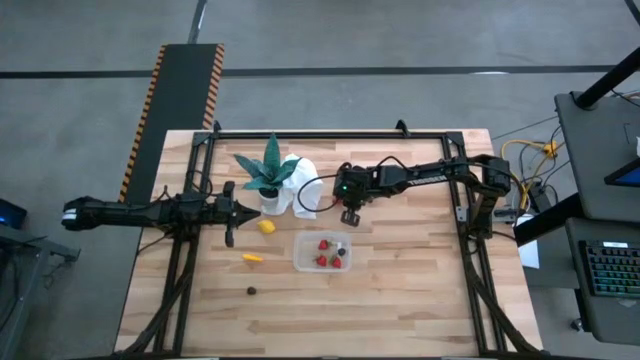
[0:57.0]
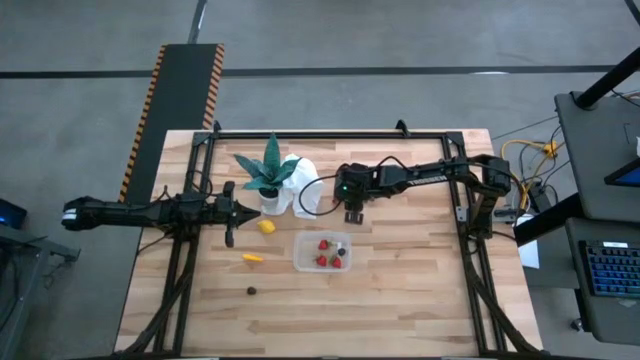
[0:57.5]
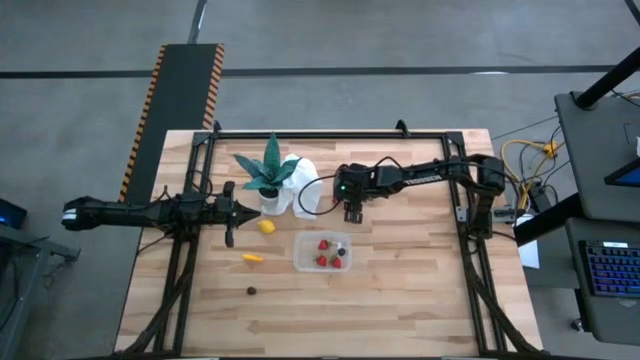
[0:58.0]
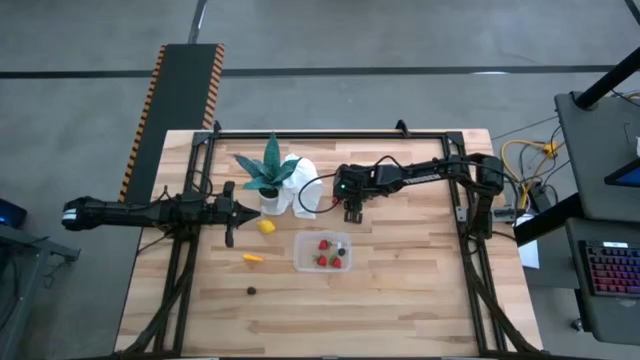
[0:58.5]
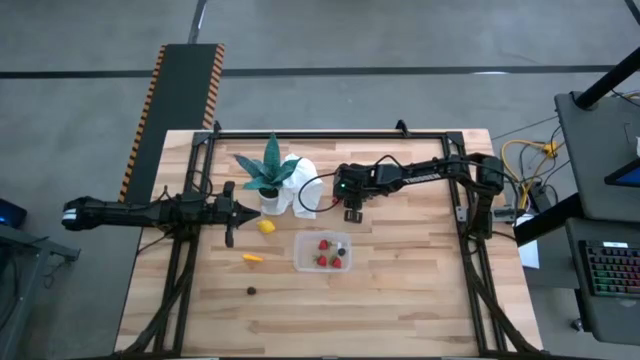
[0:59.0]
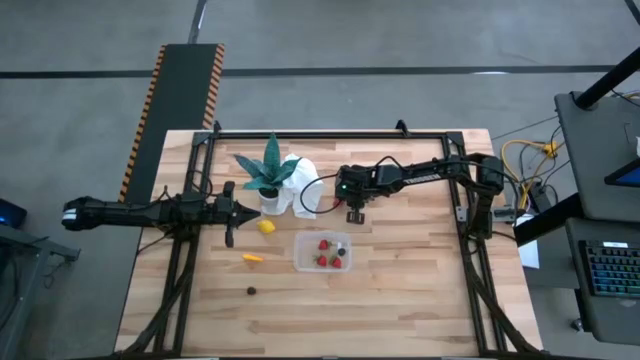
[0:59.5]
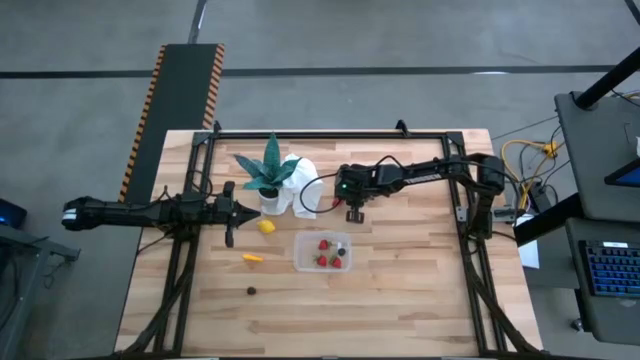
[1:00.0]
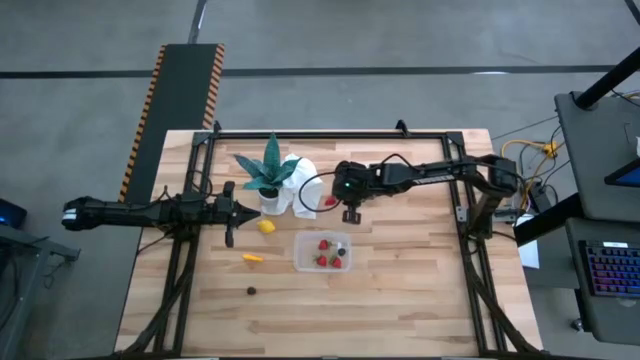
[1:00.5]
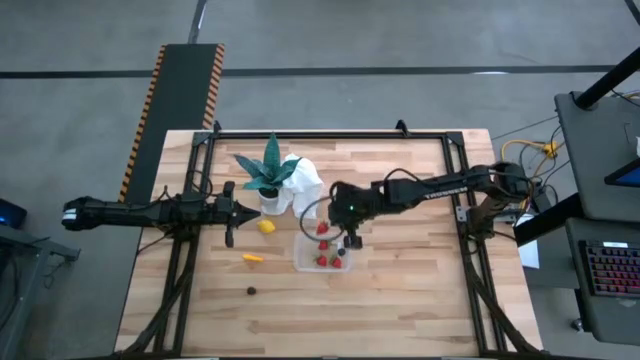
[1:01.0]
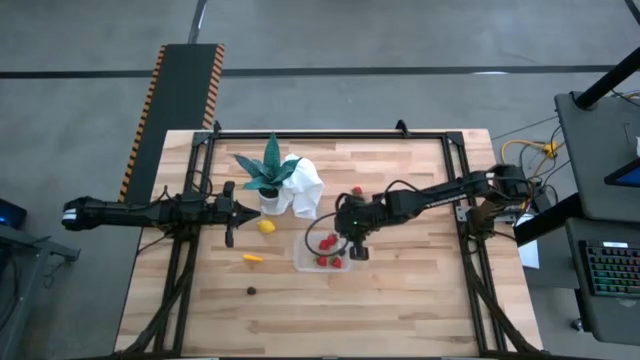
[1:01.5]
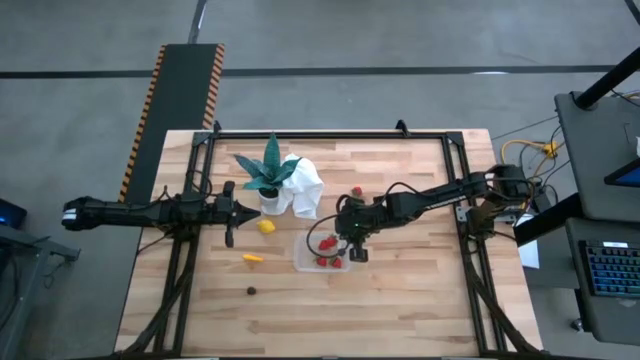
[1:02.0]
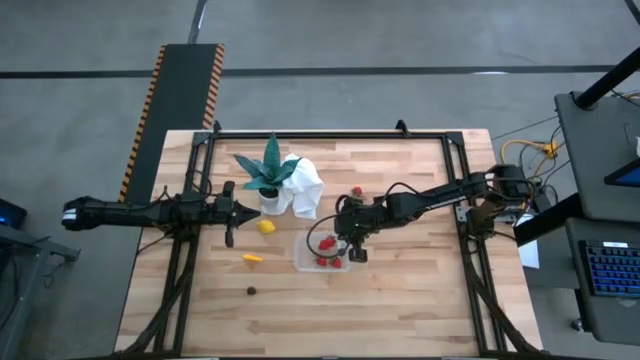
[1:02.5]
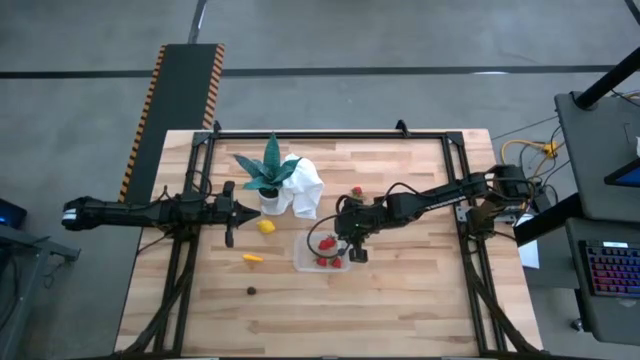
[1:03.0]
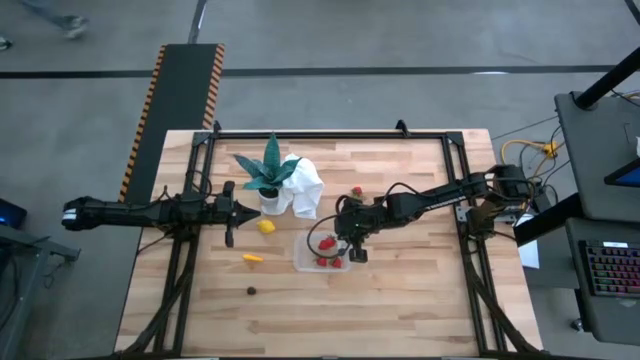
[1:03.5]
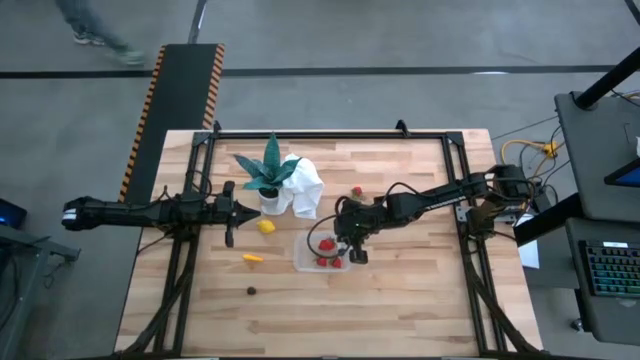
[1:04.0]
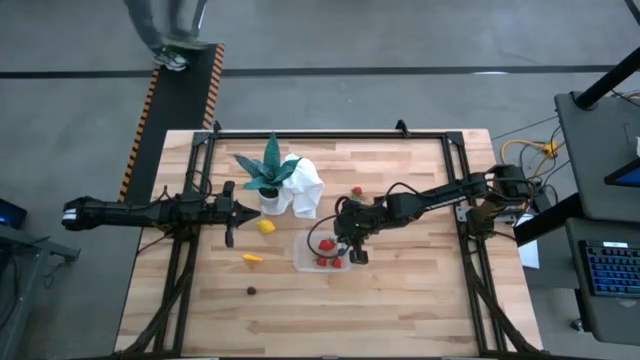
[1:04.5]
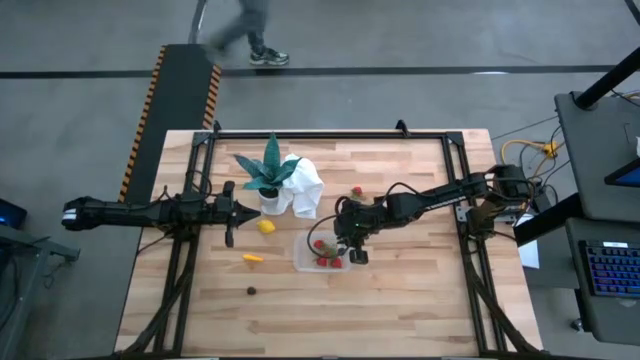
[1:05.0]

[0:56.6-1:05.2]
Task: Pick and placing Produce into tupperware
Put the strawberry into the bin

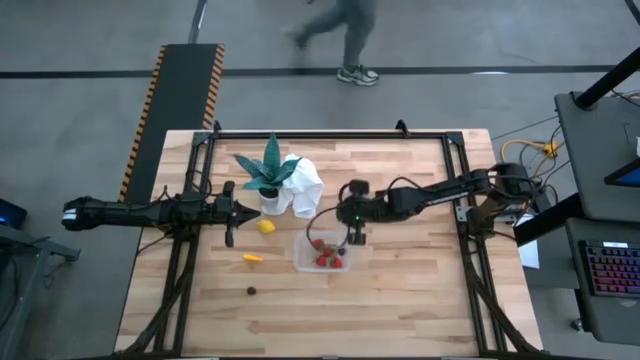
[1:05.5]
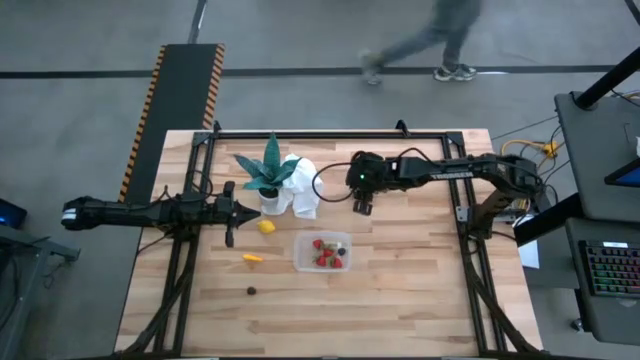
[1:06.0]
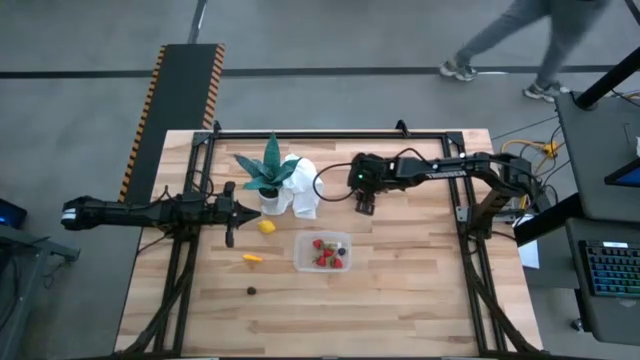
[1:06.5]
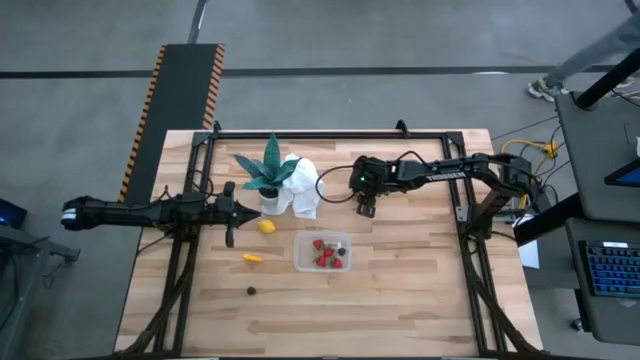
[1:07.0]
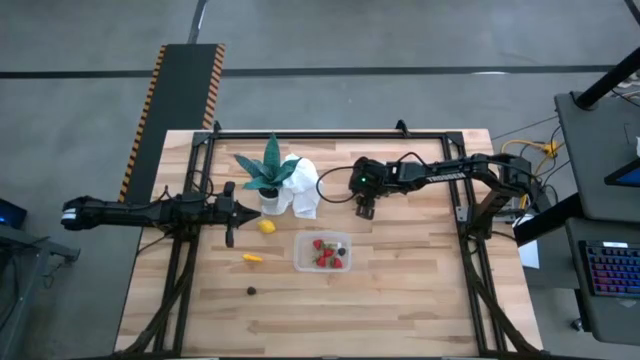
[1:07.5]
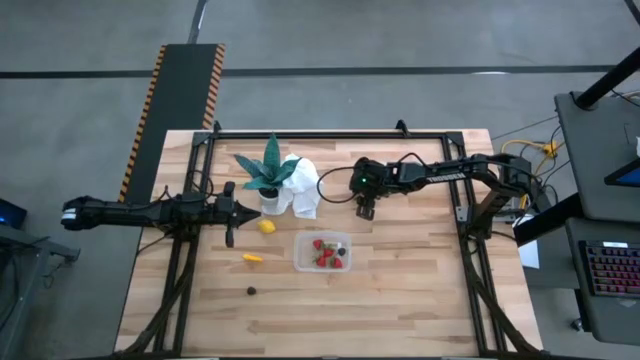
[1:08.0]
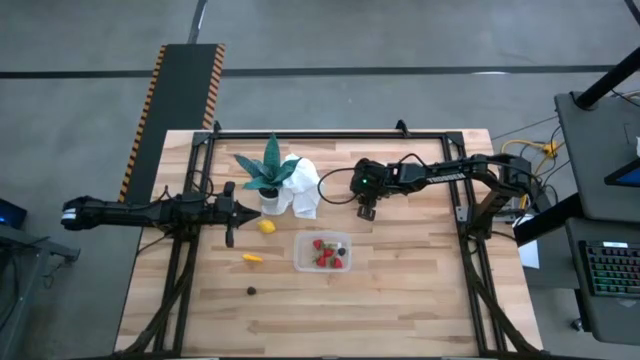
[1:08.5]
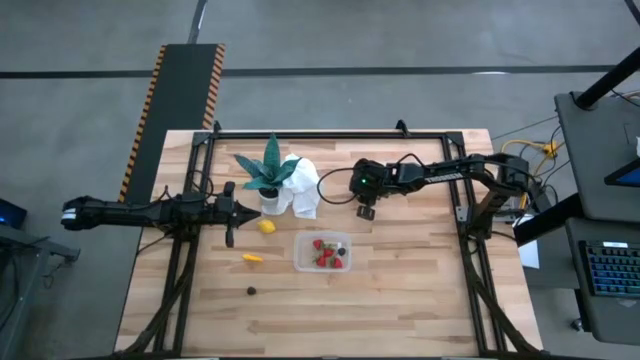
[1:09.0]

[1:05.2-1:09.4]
Put the strawberry into the bin

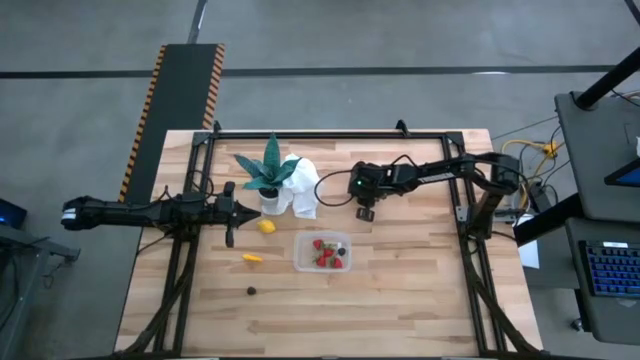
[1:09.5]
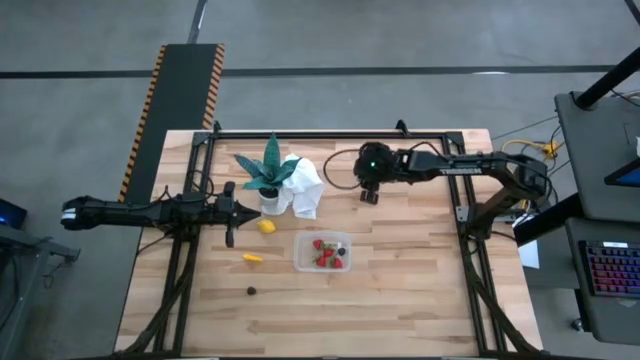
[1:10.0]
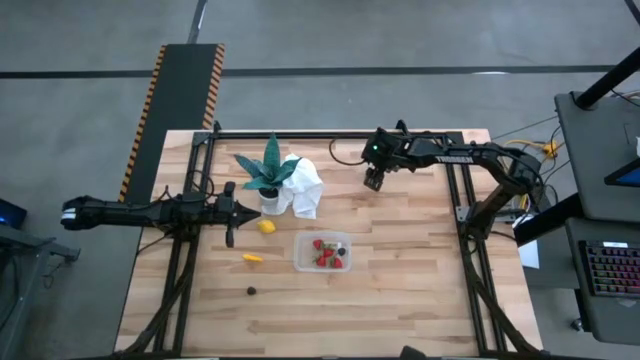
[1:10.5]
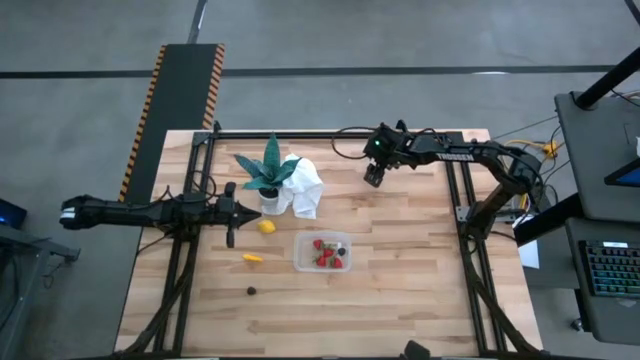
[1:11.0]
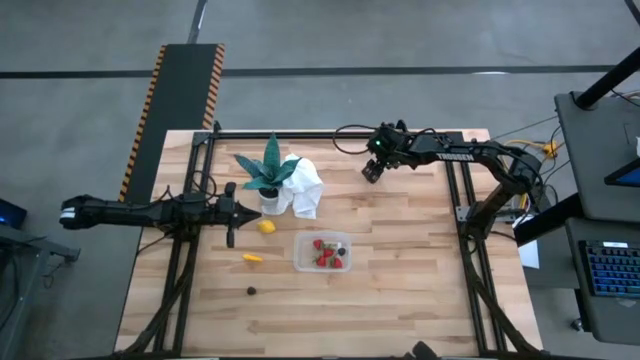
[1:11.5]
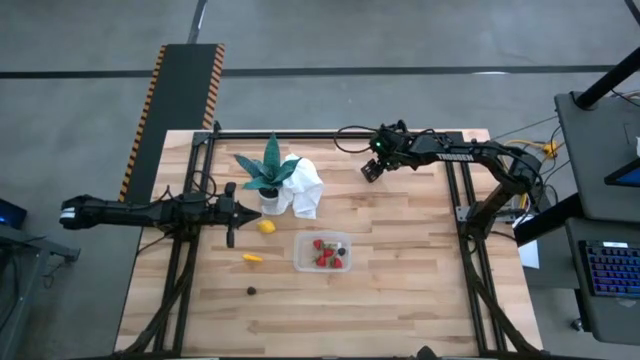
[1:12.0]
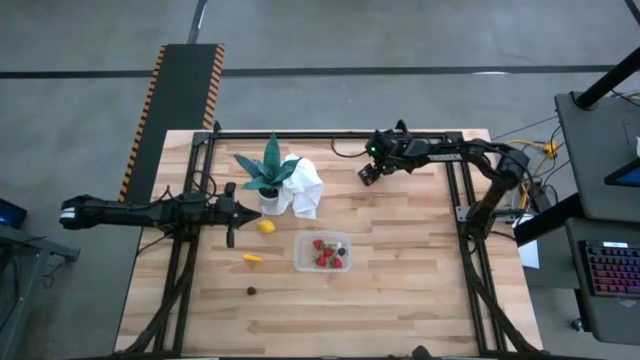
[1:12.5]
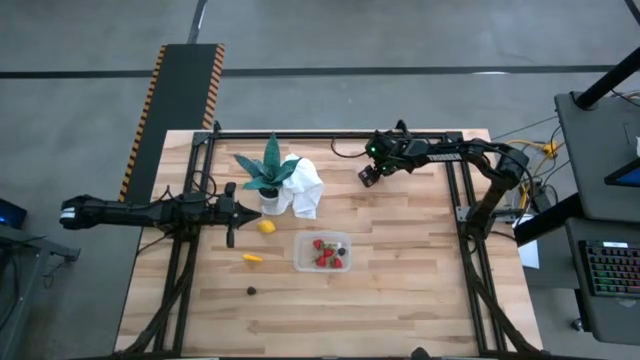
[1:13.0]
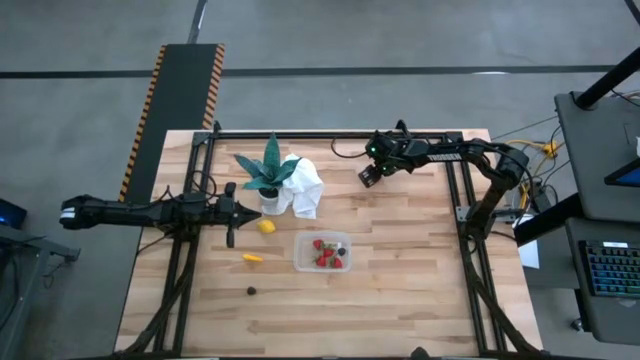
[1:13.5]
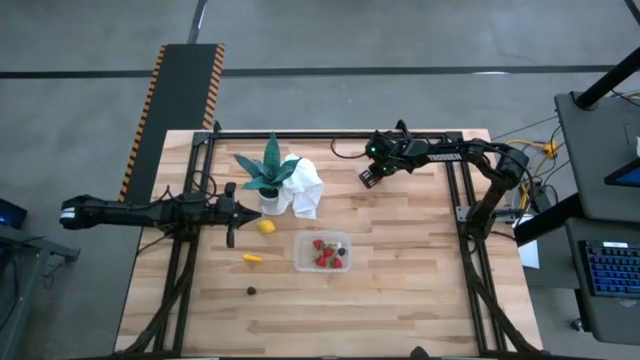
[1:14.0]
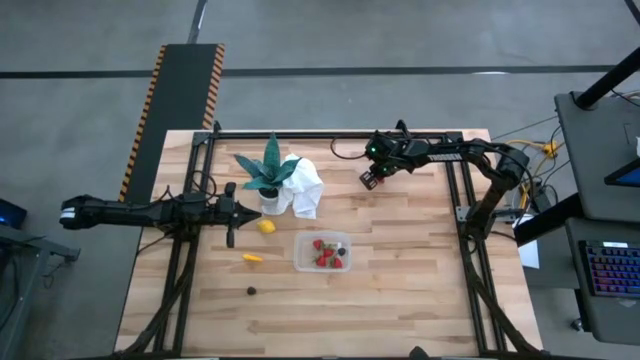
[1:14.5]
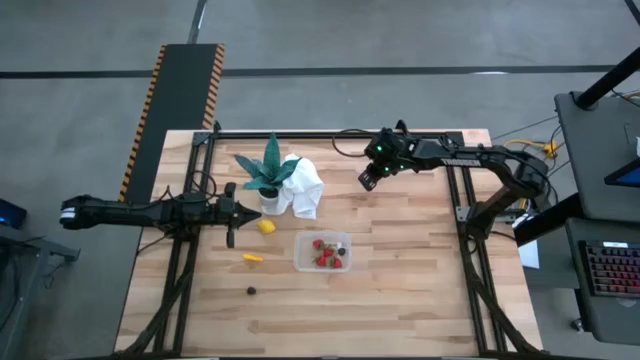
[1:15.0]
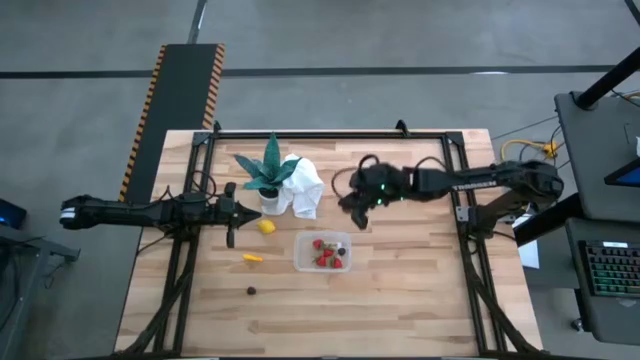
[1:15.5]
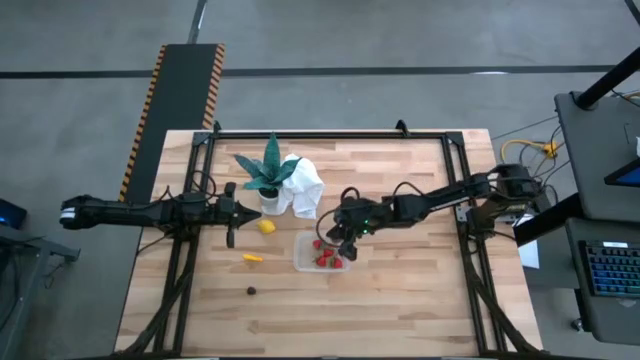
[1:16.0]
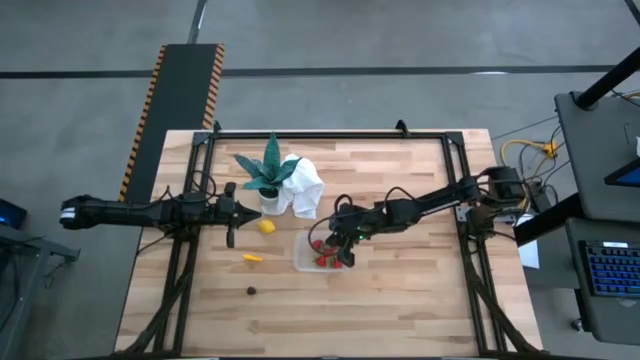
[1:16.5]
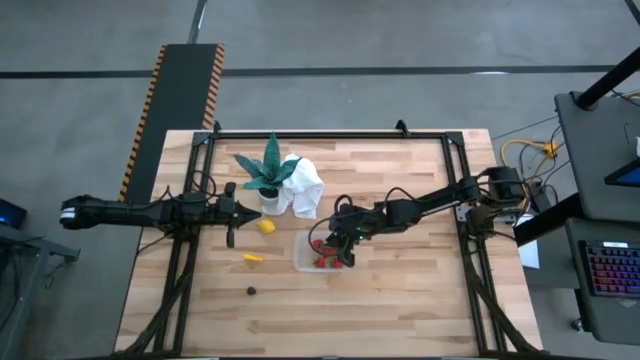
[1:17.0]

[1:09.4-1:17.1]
Put the strawberry into the bin
